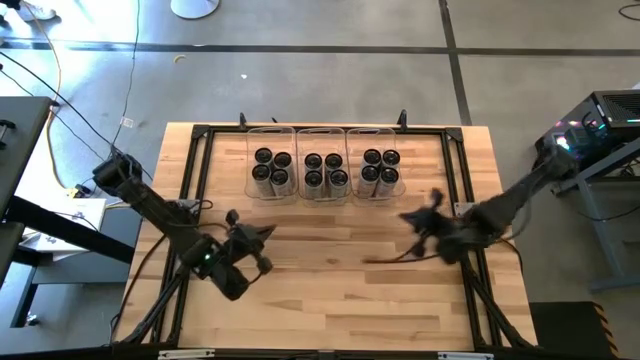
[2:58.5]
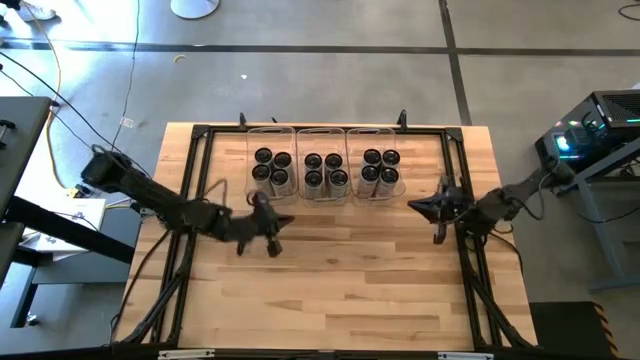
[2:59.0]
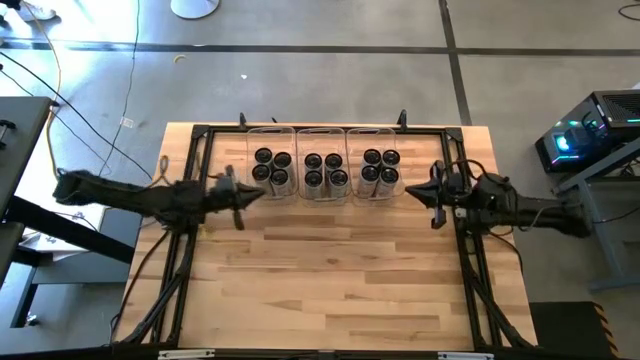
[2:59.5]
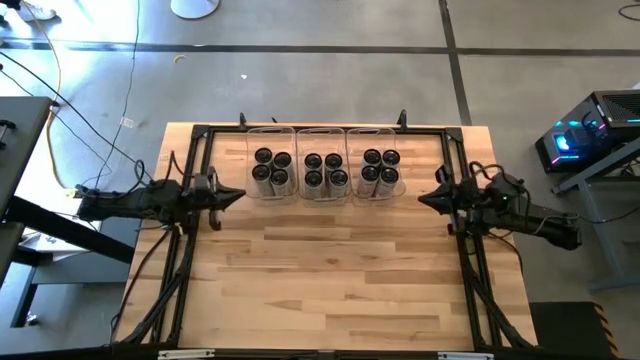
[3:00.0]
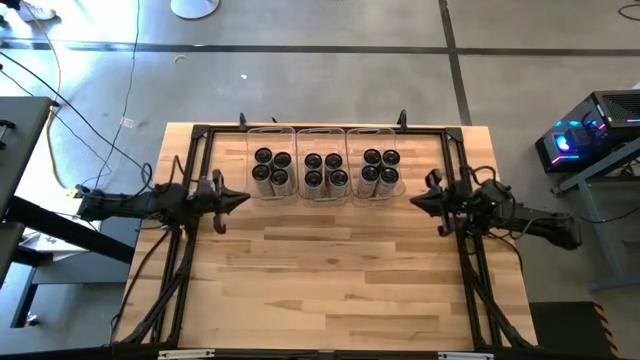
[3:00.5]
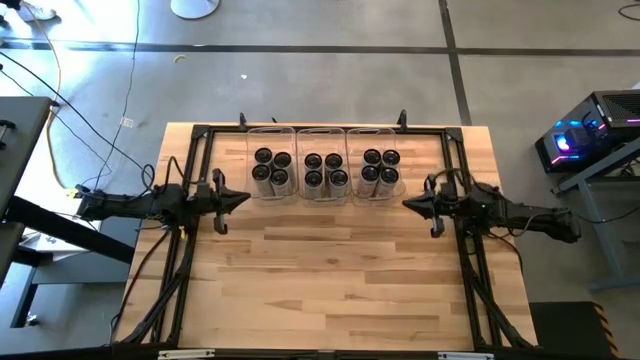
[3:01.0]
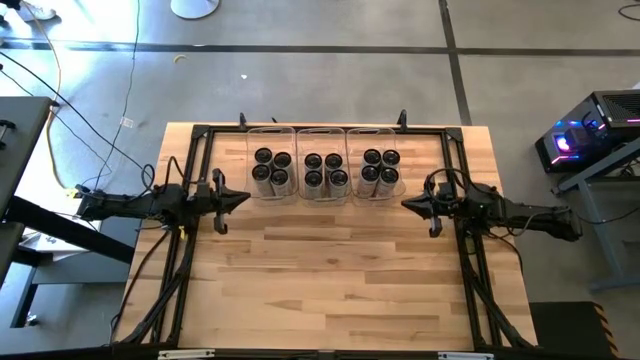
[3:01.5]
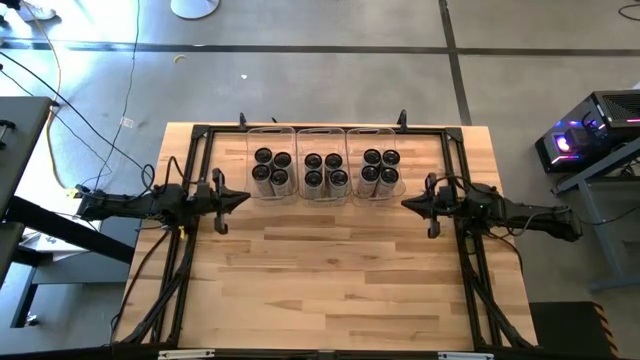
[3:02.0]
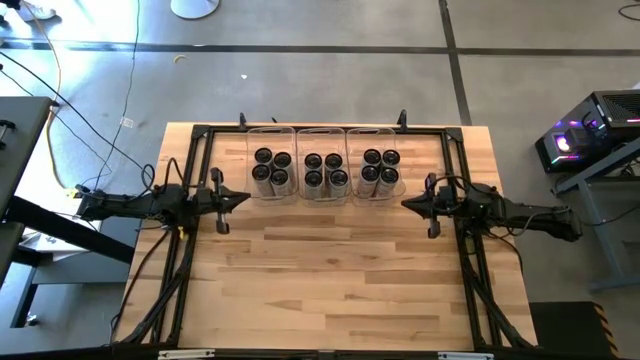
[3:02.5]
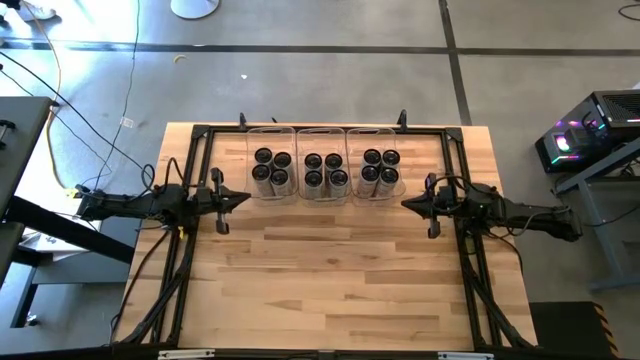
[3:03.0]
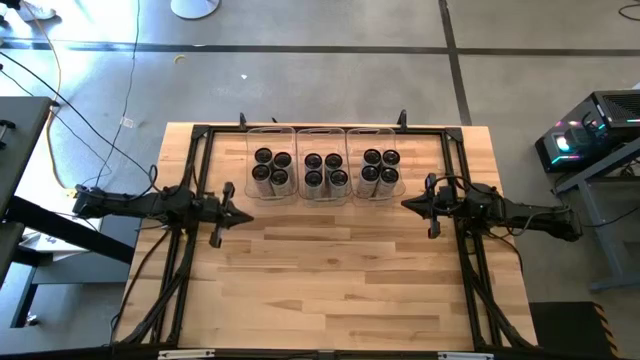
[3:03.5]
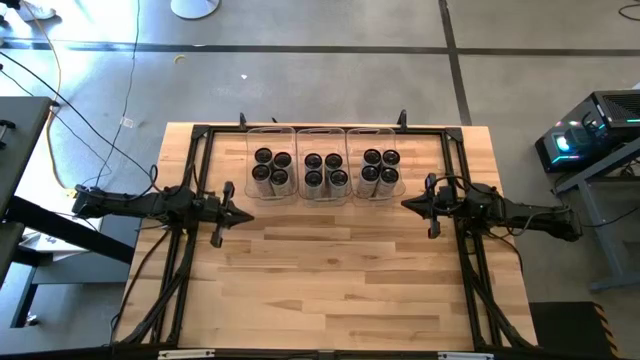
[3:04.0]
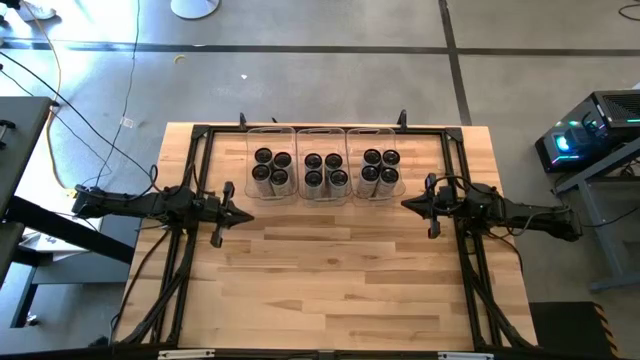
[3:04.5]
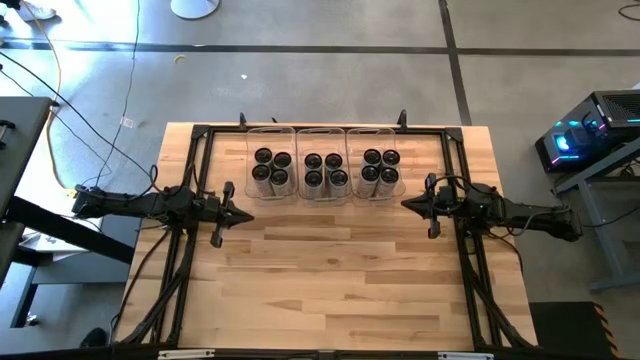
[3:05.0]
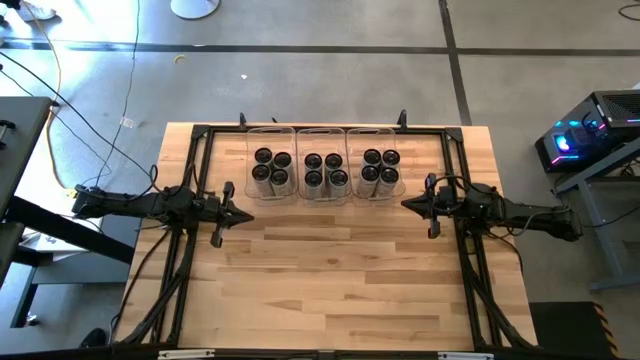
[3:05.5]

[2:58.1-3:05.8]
Task: Sort soda cans
Return to Home Position

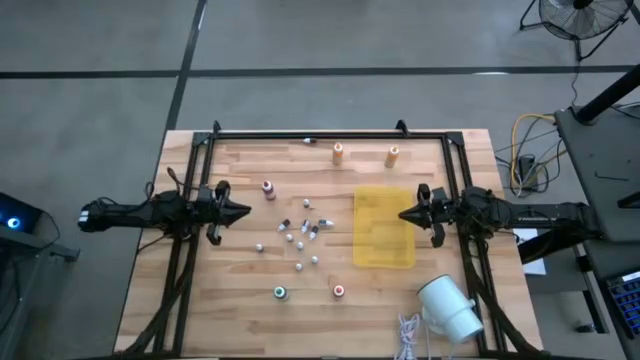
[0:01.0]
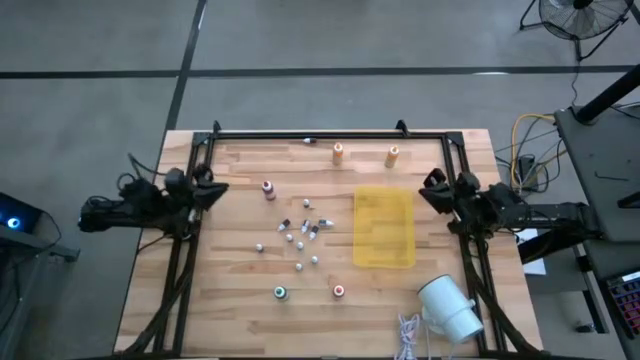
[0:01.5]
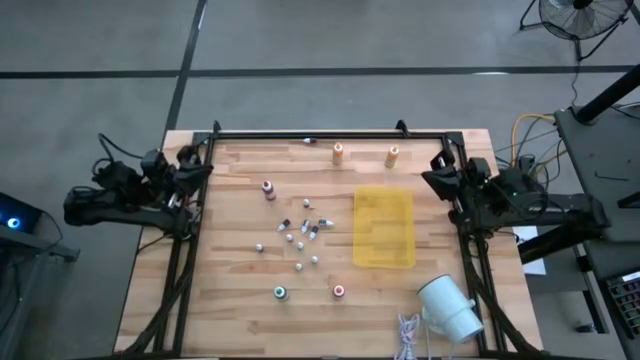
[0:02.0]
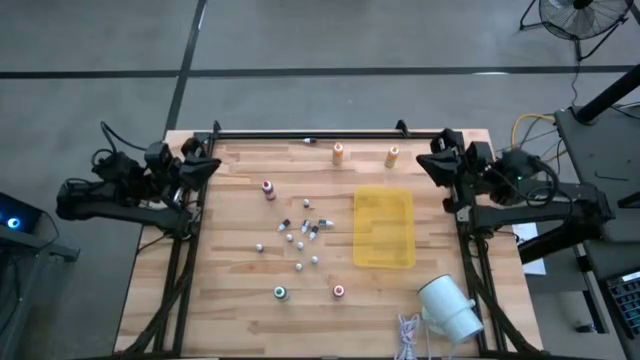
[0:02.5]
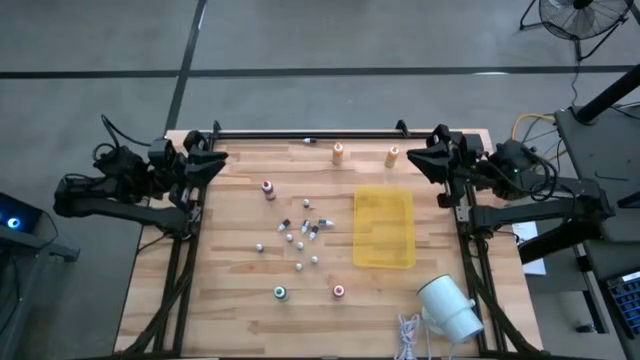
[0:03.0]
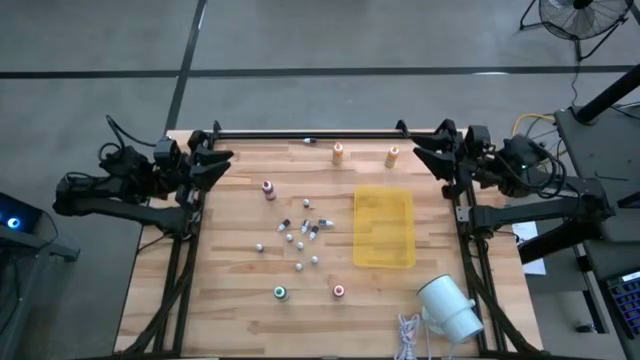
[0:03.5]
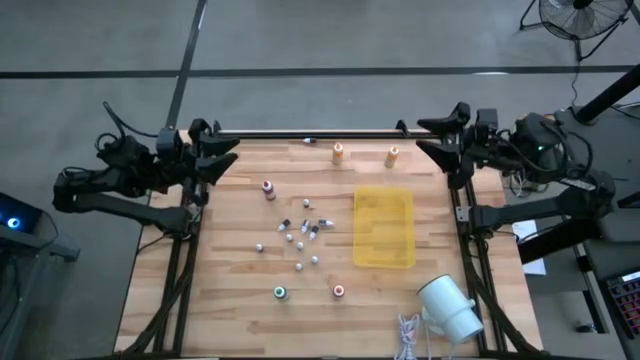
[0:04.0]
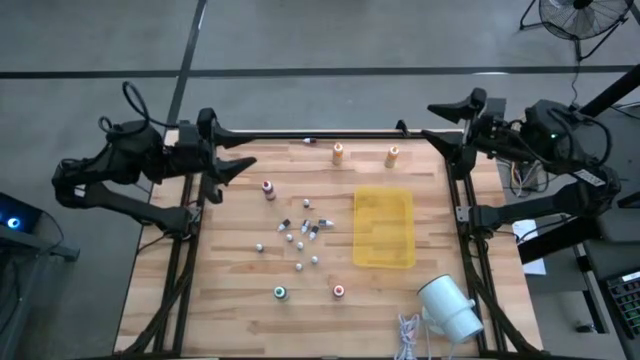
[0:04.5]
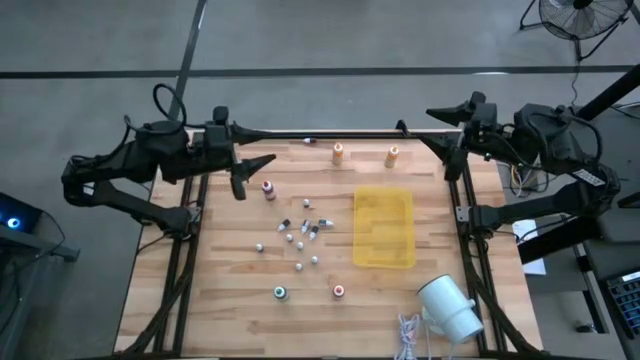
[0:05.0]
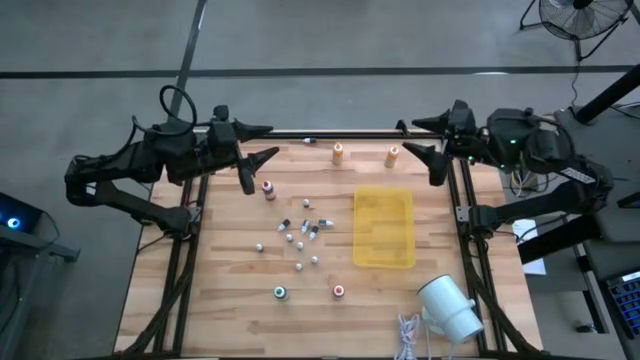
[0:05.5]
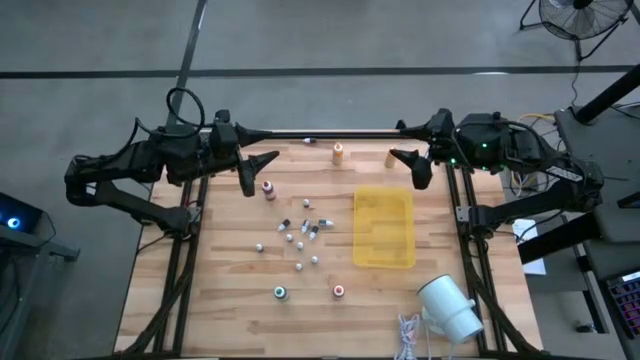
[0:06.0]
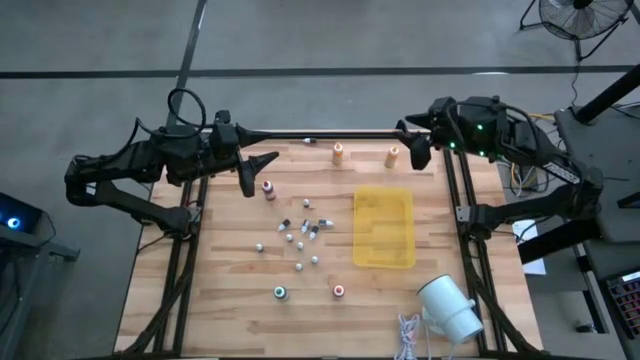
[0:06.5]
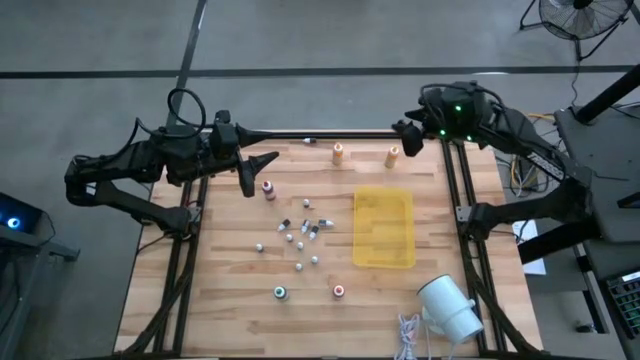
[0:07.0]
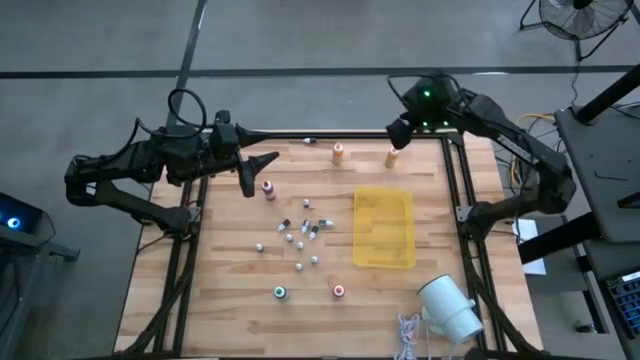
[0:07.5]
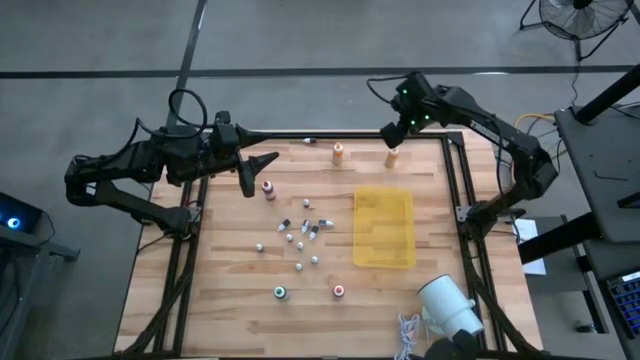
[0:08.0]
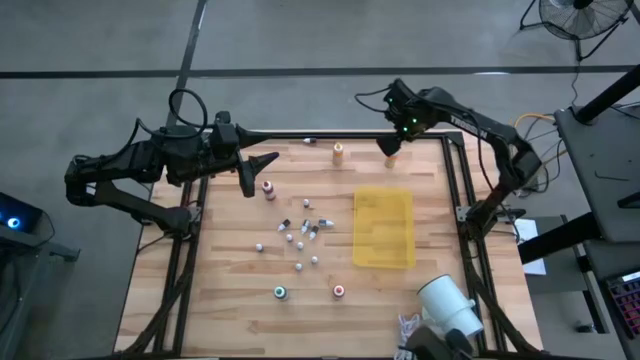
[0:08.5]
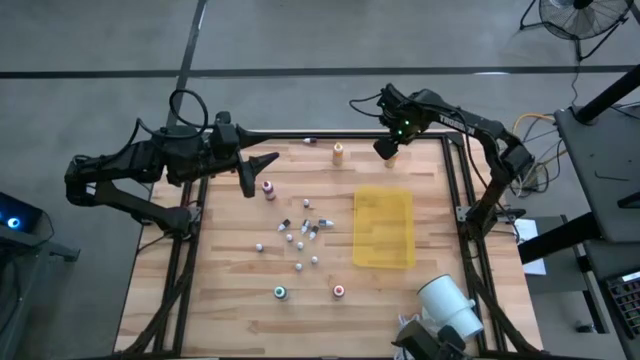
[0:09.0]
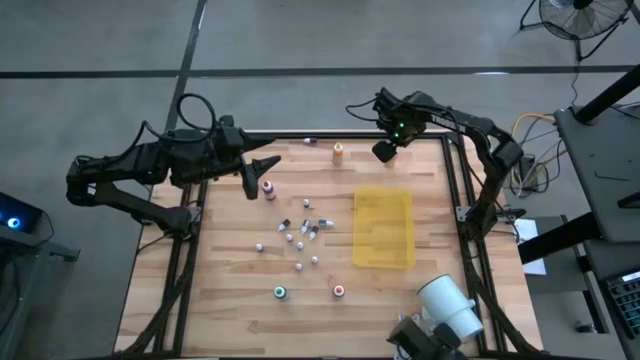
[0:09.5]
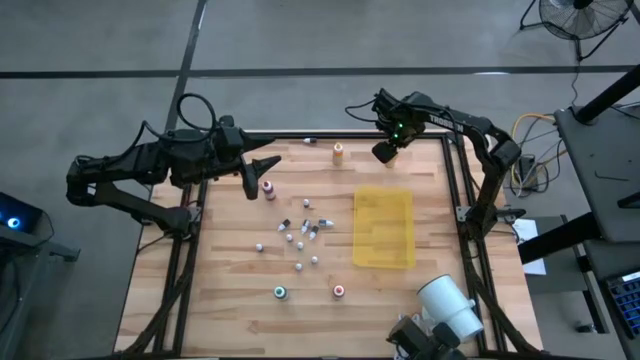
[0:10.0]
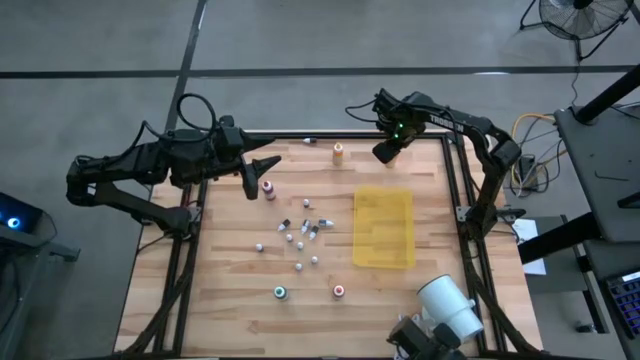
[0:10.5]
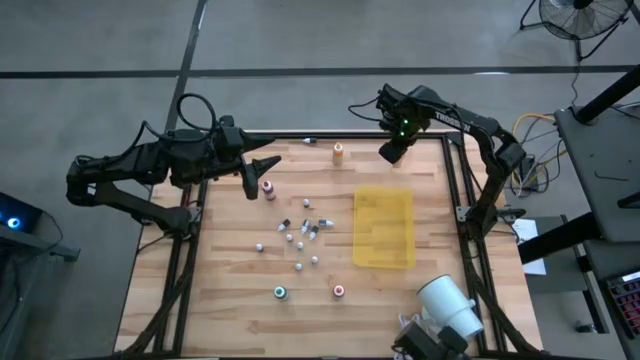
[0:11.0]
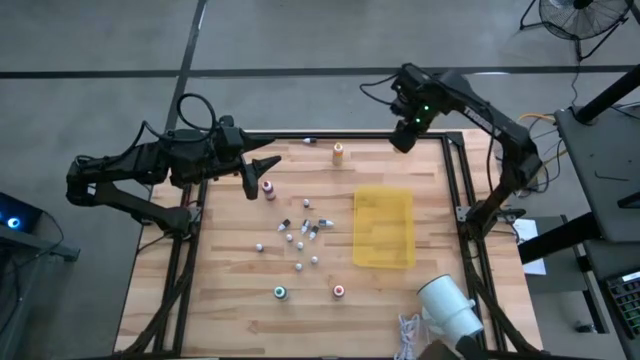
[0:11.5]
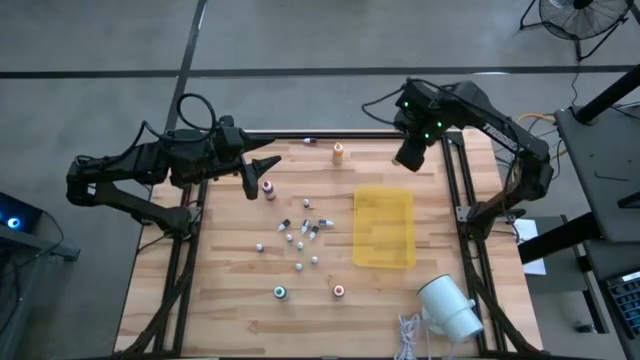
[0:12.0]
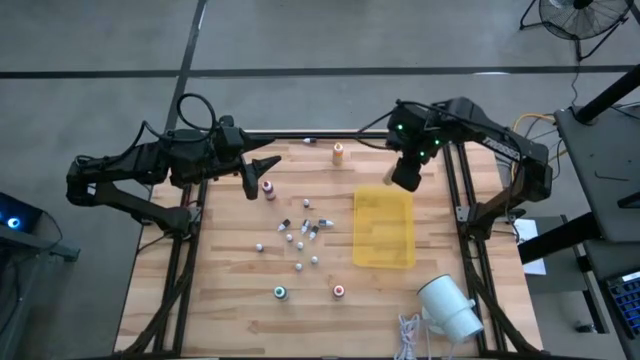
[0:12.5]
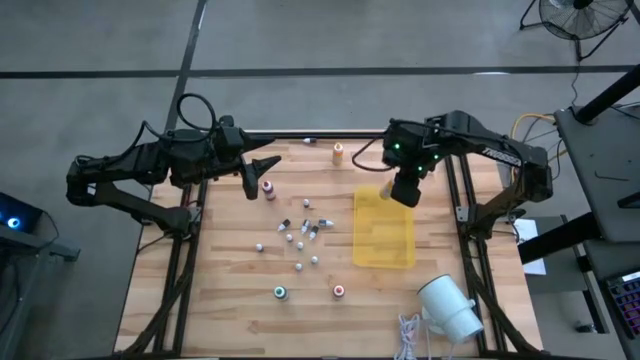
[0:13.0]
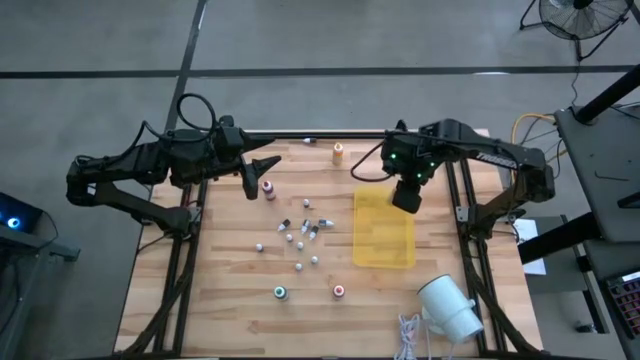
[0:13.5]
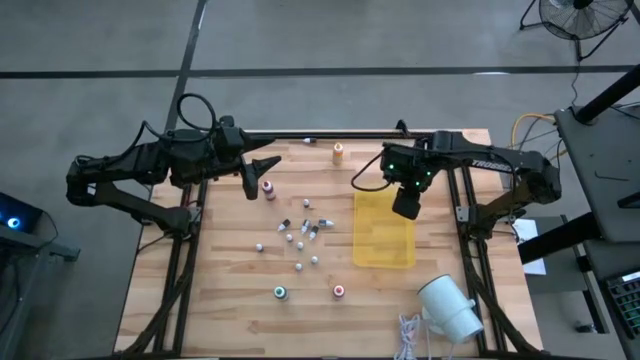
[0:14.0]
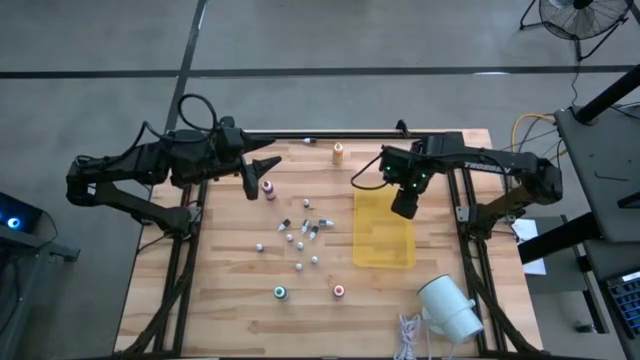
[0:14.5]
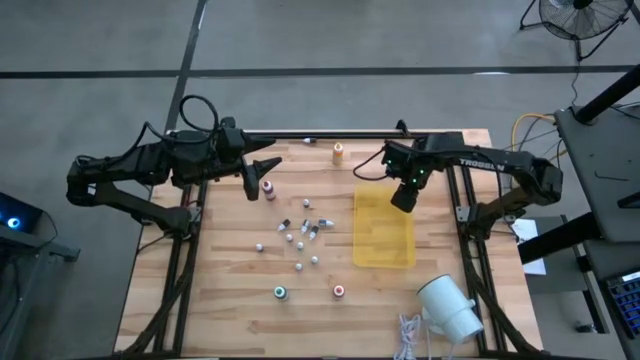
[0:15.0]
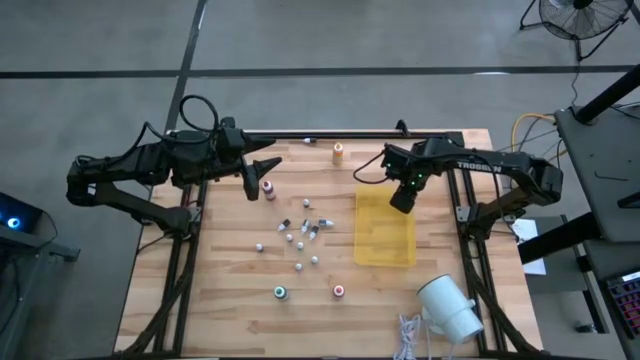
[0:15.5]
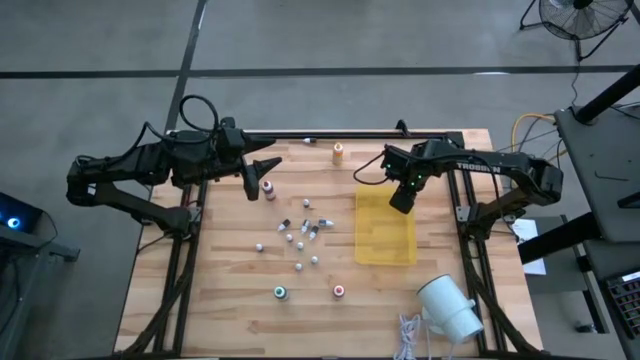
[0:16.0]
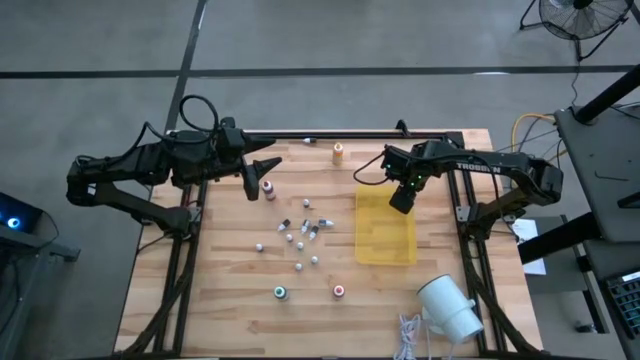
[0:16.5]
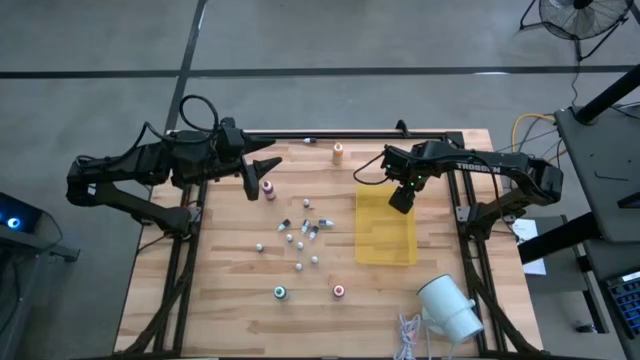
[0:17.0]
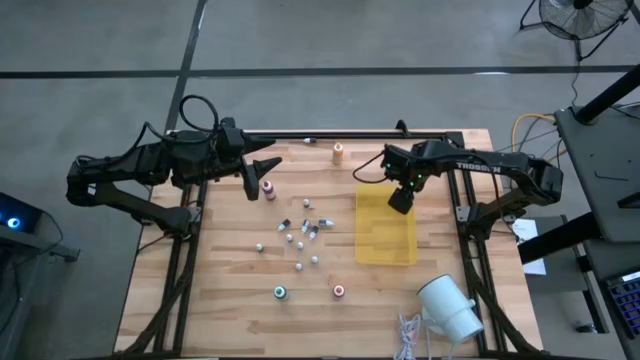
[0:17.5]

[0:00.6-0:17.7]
Task: Pick & Place food coloring
Put the right big yellow food coloring bottle into the yellow bin
